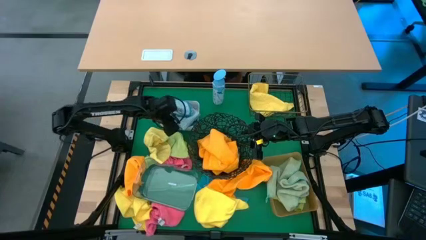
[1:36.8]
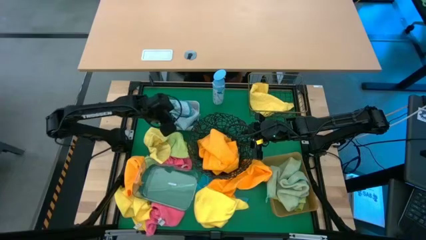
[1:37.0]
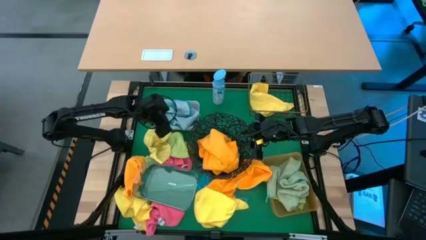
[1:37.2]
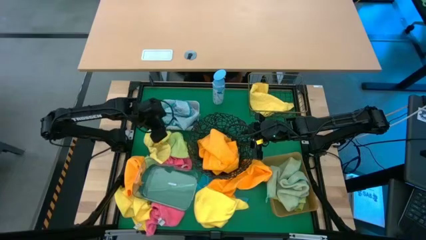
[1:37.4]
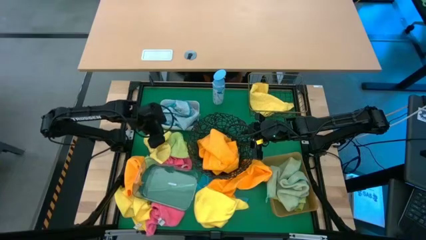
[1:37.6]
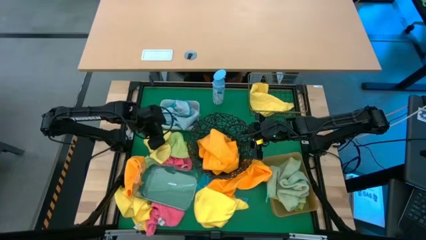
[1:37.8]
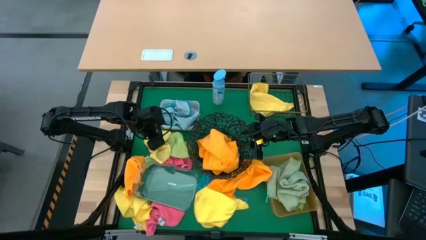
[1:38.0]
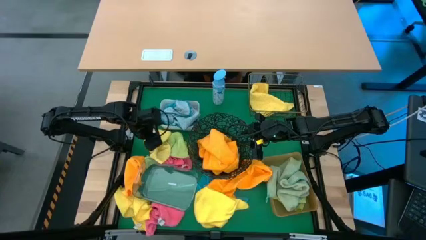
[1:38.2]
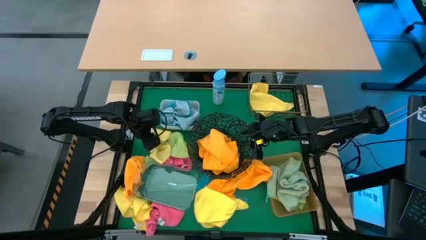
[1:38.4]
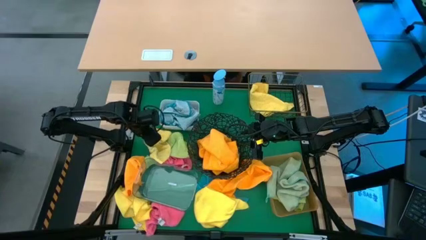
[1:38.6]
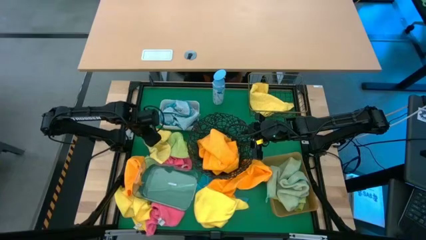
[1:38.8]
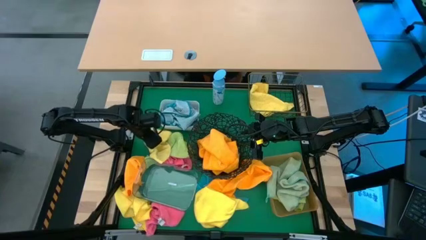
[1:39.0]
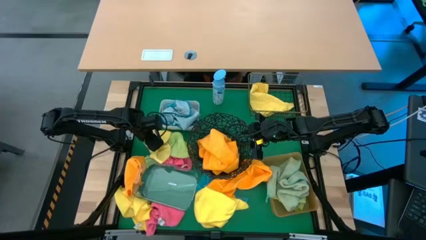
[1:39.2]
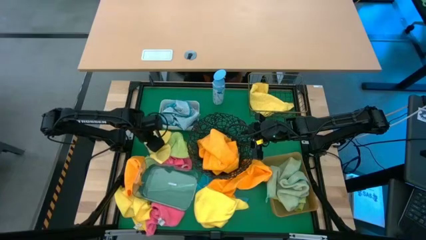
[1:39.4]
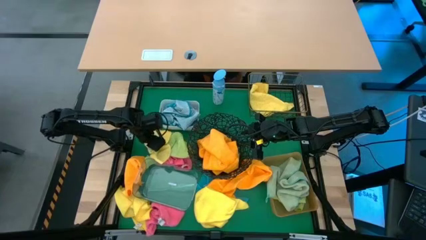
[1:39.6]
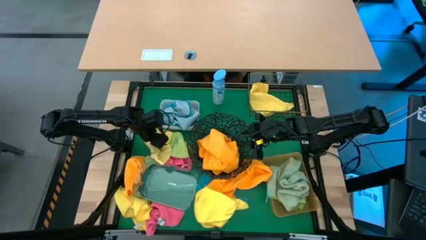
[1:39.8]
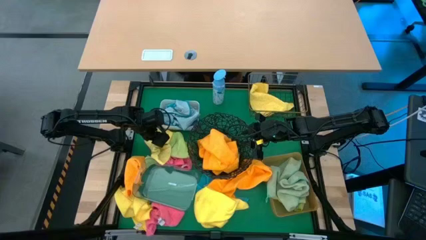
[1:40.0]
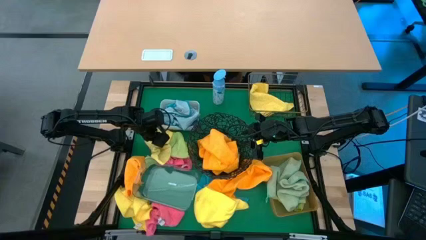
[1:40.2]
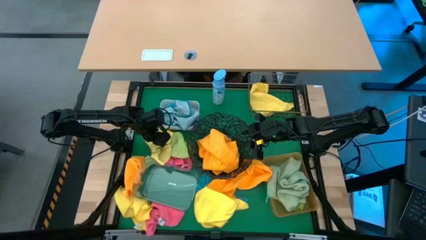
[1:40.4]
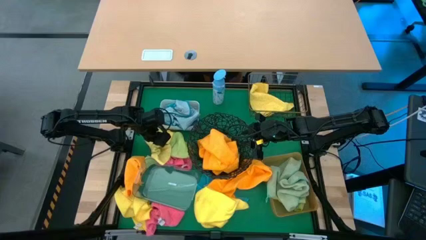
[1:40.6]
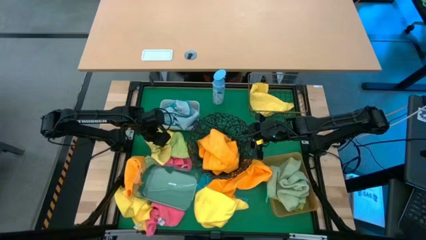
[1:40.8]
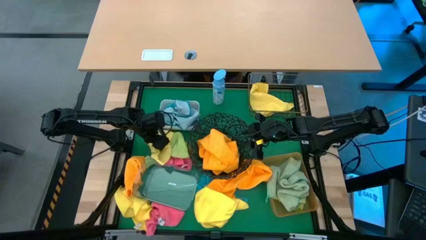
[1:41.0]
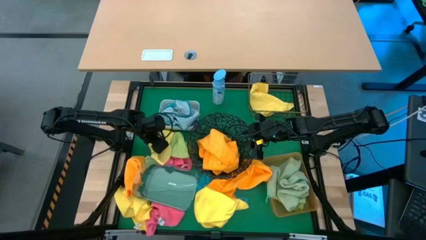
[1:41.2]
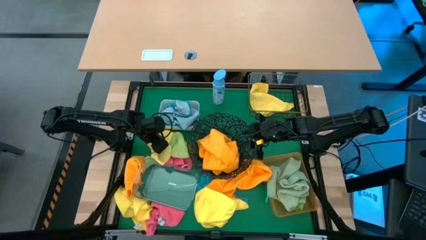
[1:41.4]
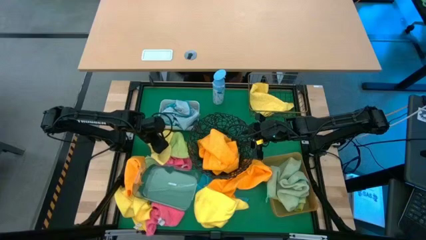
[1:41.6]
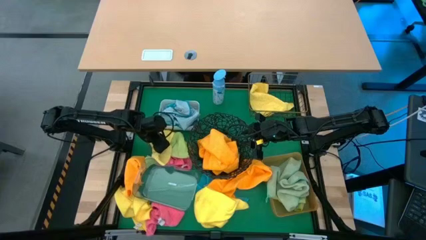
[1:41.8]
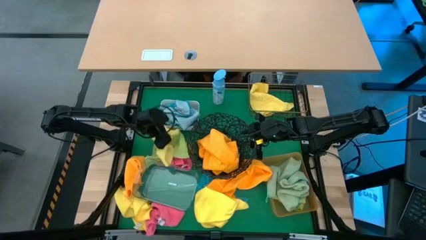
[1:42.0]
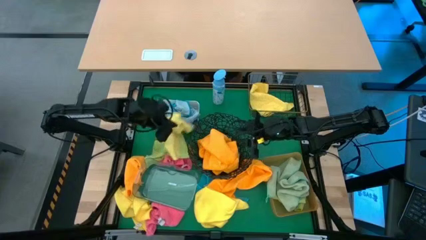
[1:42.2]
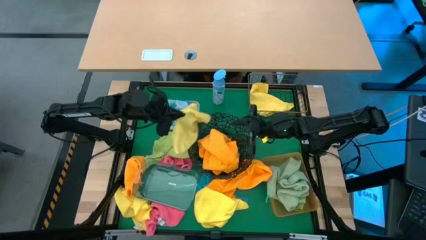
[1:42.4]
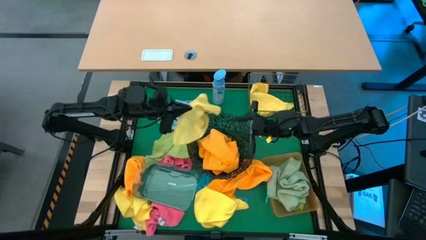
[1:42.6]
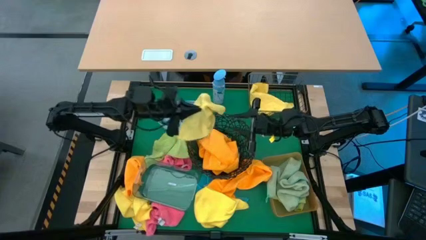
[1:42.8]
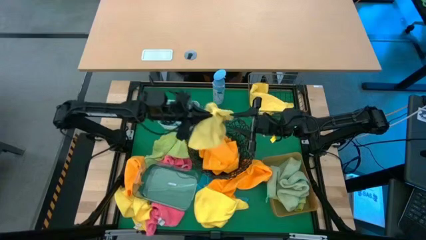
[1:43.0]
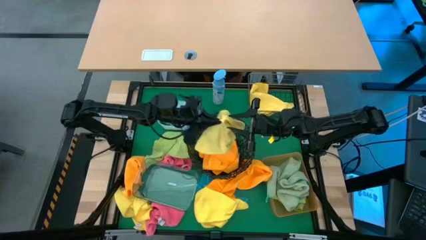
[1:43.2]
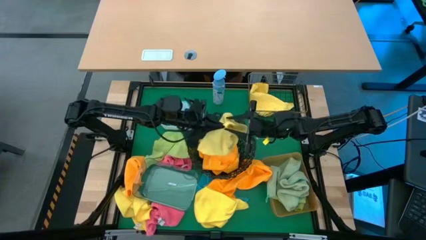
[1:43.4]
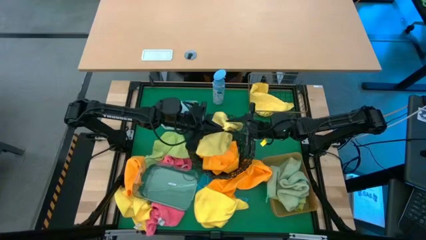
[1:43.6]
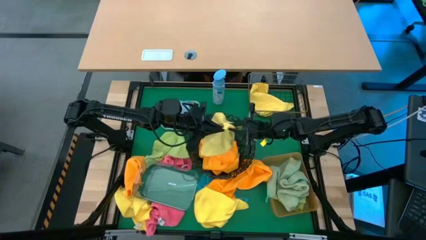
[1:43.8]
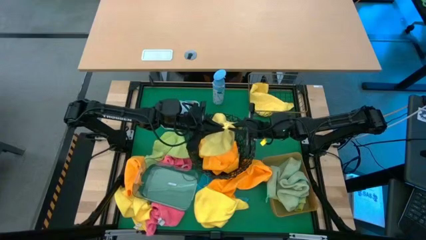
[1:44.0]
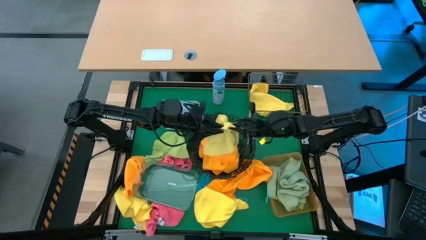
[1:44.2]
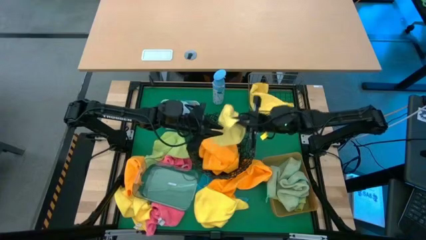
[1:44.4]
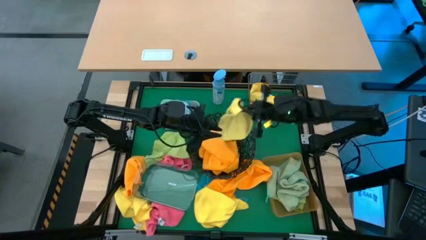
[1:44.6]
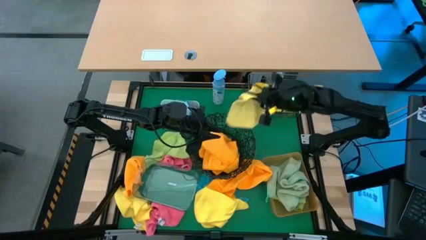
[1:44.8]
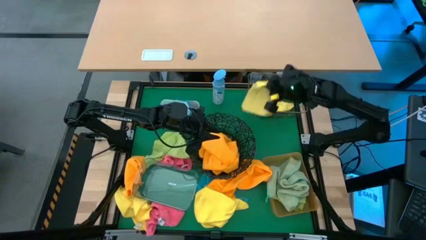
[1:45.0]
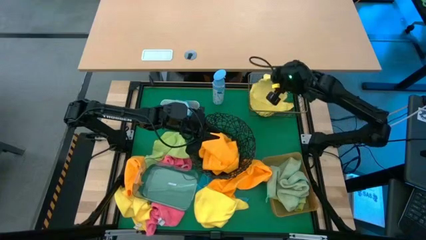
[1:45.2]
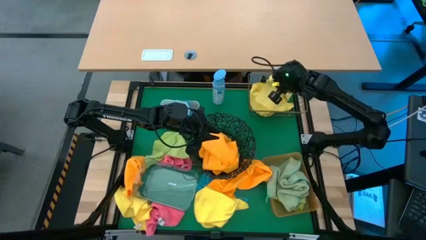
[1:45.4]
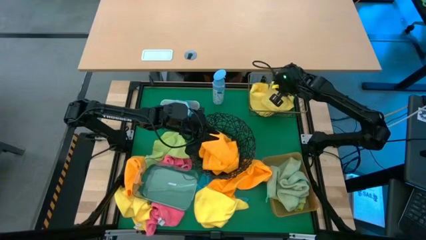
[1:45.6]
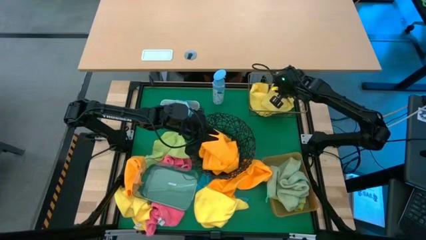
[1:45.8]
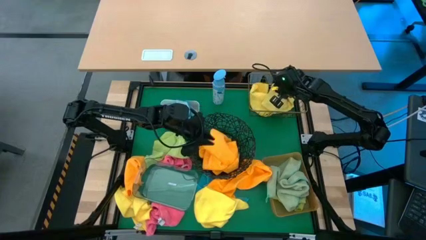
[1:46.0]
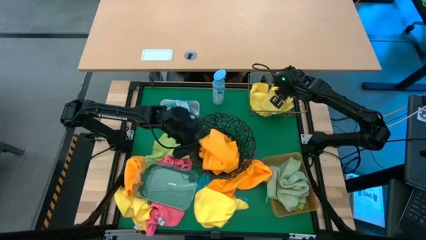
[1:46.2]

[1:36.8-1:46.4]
Task: Sort microfiber towel by color & place in baskets
Put the yellow microfiber towel into the square wire basket

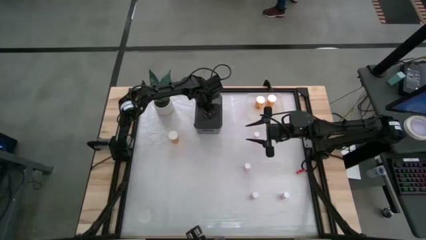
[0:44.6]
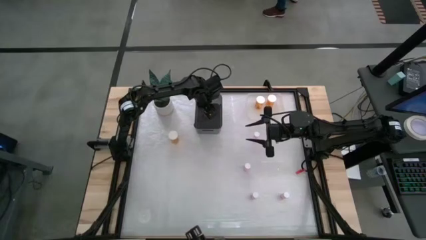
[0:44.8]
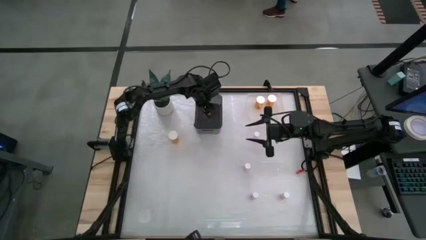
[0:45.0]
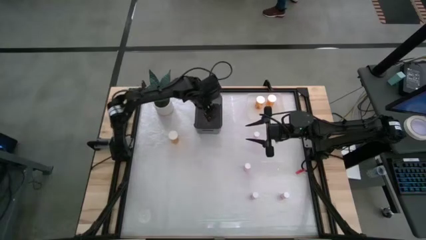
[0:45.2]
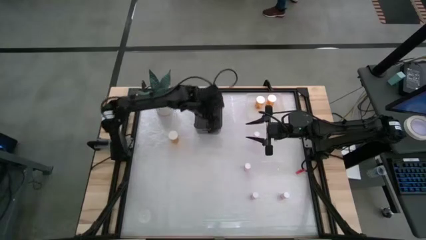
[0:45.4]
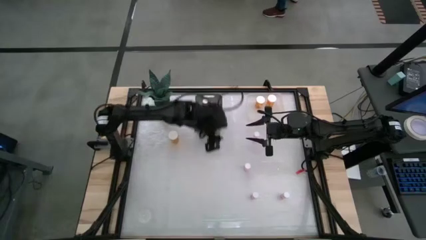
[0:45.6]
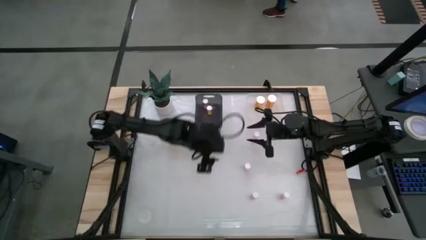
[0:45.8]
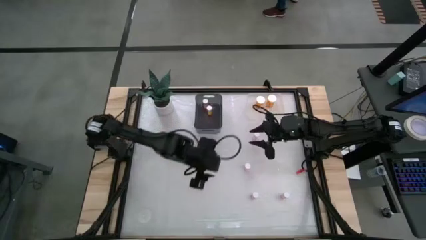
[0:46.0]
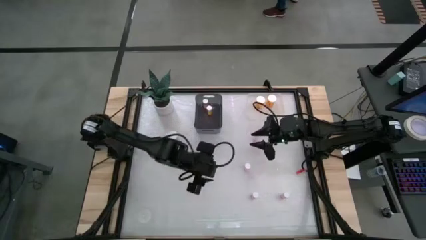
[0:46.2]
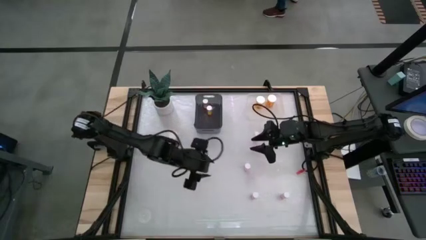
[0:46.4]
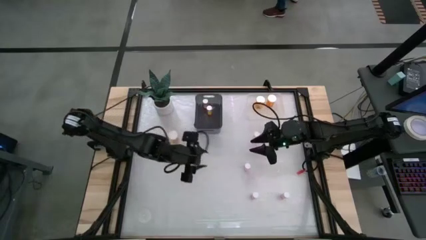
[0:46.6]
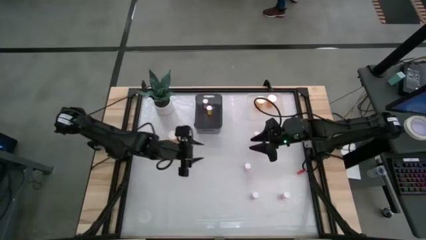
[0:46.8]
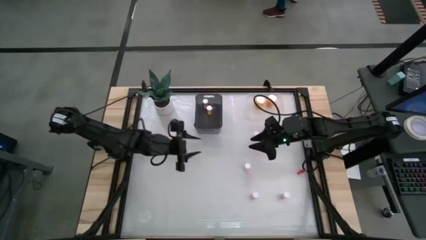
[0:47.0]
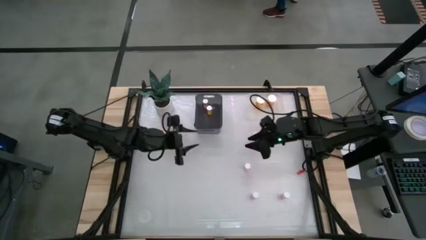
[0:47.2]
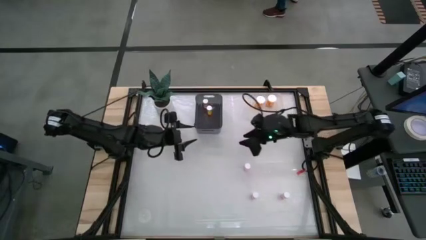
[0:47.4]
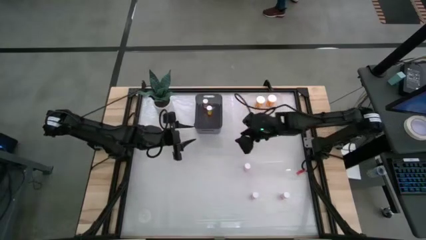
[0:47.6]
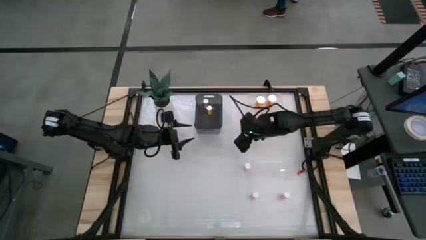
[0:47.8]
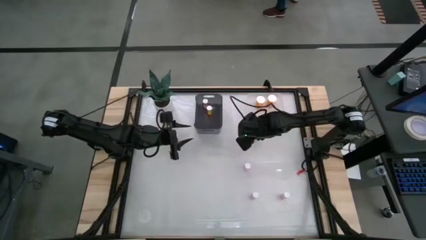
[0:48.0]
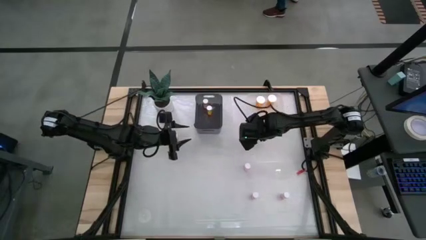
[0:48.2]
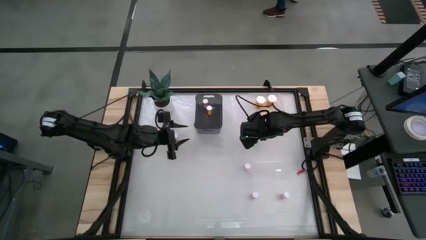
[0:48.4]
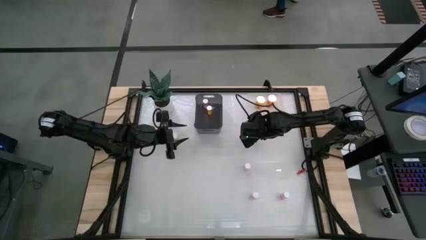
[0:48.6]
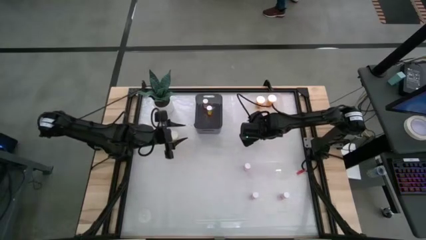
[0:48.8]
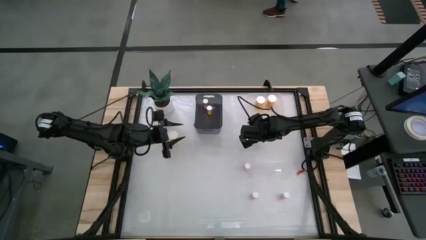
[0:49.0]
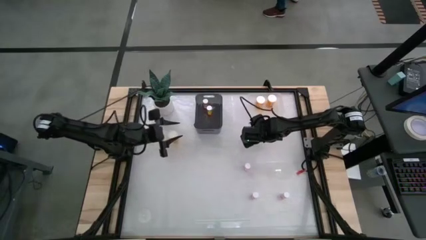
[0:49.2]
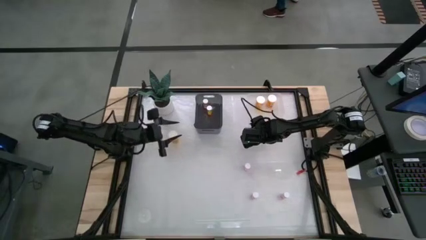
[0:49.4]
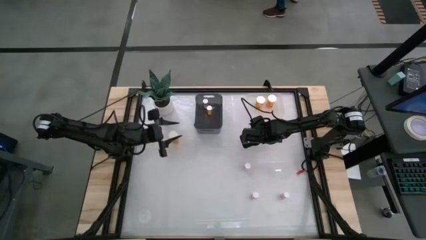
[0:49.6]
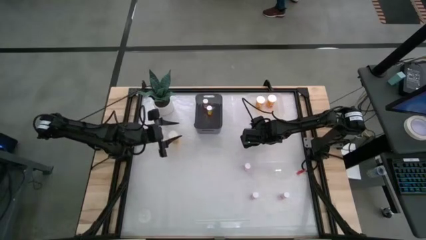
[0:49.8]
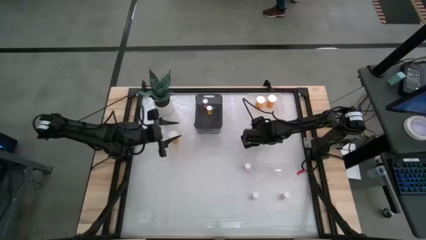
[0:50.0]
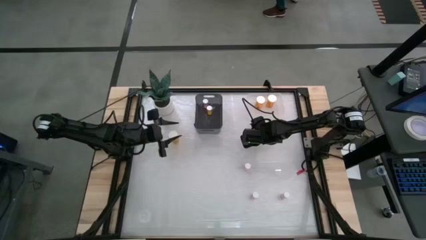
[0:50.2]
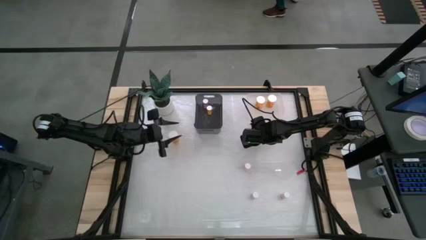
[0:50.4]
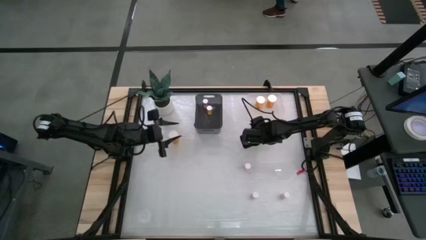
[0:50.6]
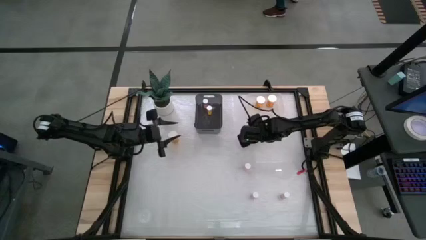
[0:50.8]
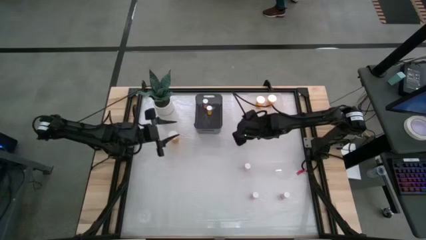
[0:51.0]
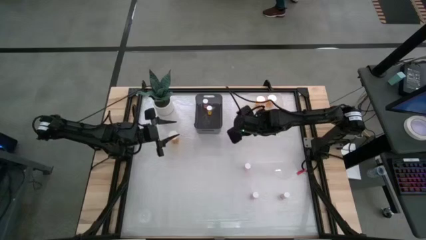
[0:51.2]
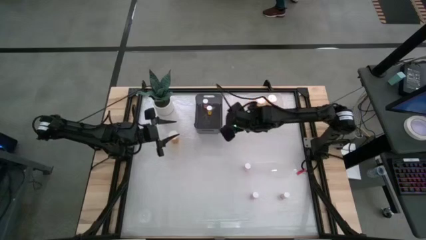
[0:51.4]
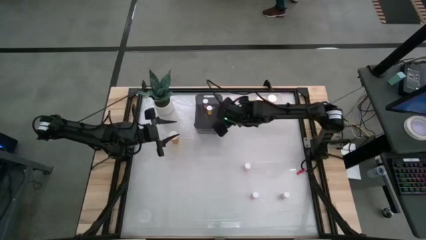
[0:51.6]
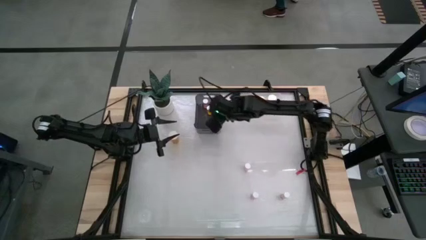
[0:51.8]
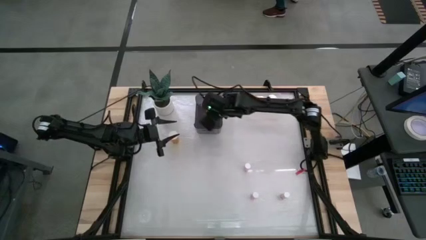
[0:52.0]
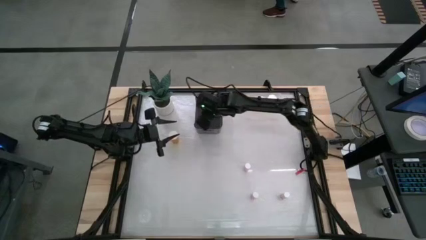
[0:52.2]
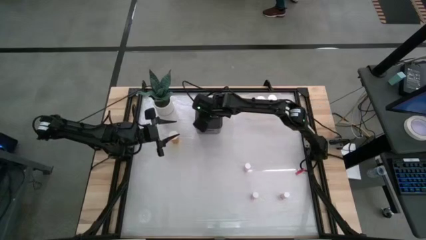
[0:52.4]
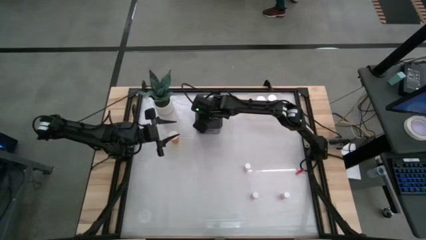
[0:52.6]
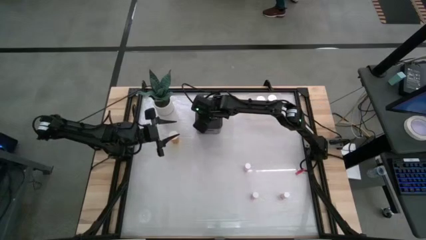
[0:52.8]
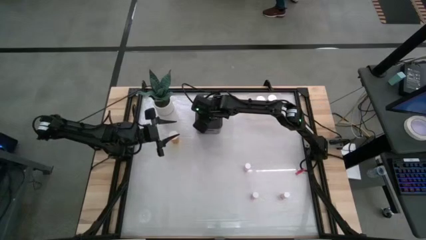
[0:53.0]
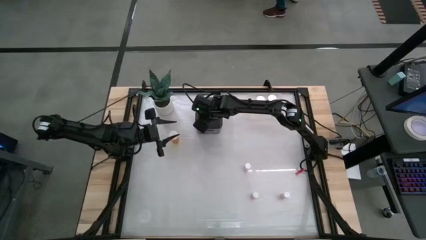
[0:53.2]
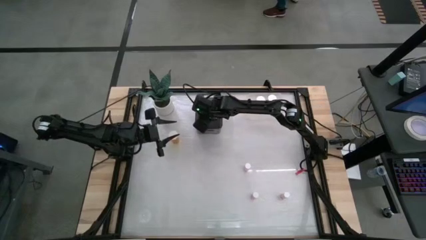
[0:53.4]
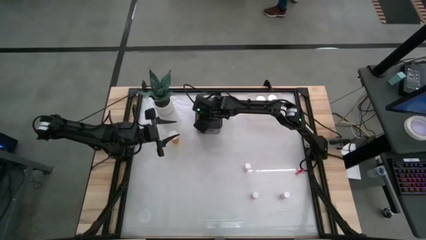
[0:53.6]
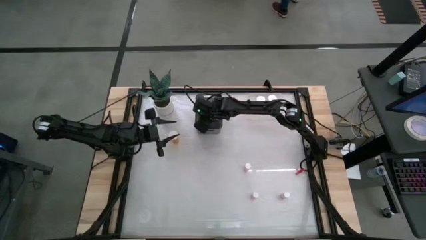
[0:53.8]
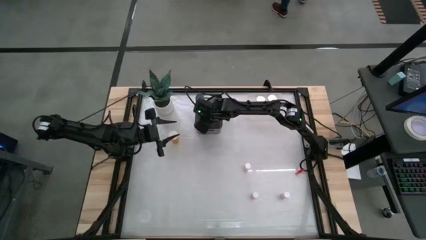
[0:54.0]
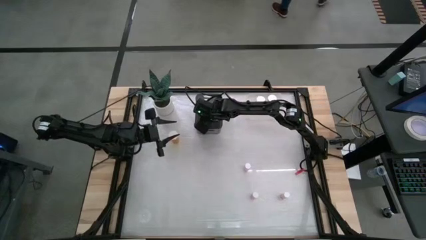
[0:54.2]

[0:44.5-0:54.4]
Task: Pick and place medicine bottles into bin by pill shape (circle, oval)
Put the small pink pill bottle into the black bin
